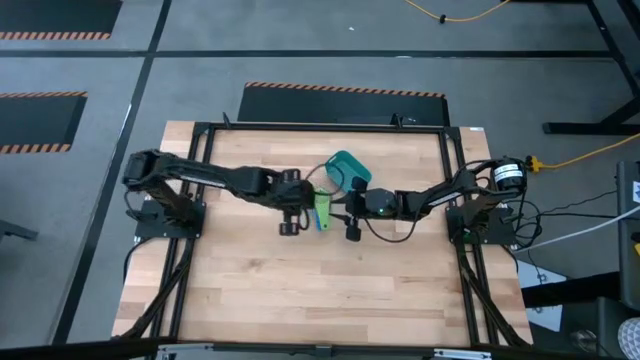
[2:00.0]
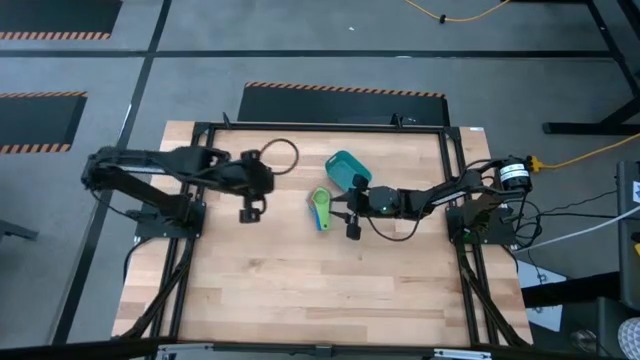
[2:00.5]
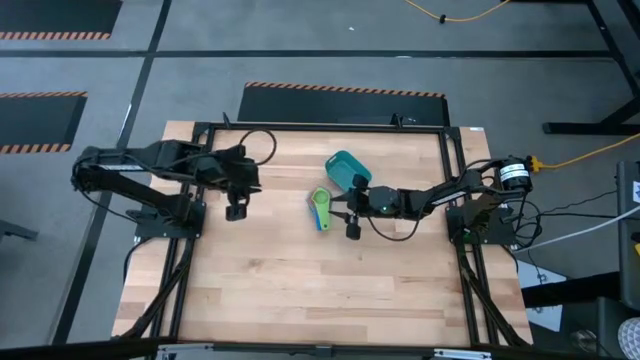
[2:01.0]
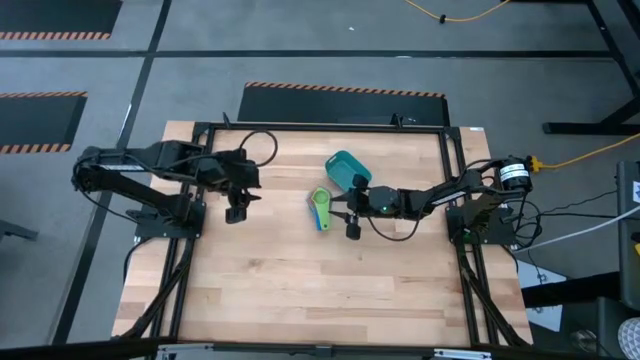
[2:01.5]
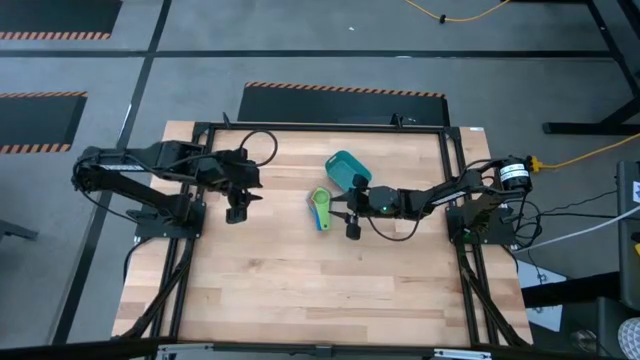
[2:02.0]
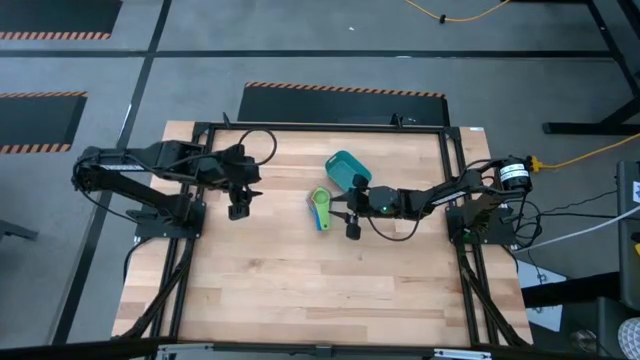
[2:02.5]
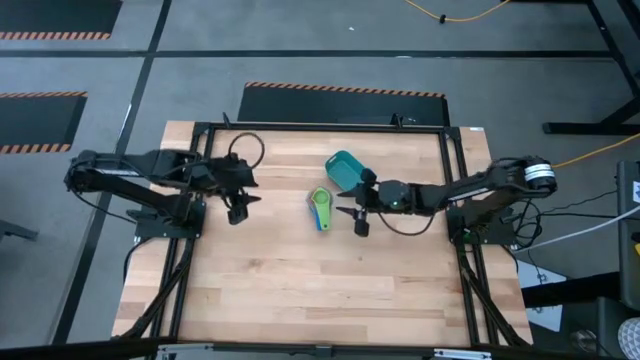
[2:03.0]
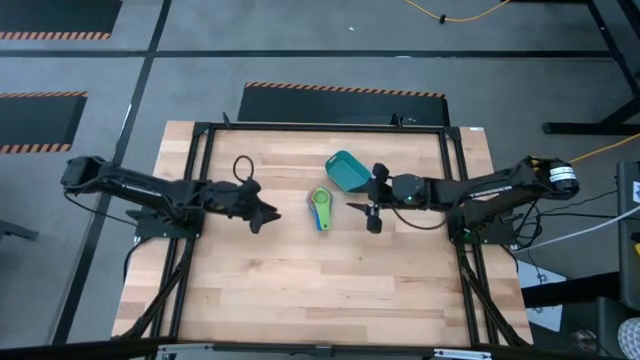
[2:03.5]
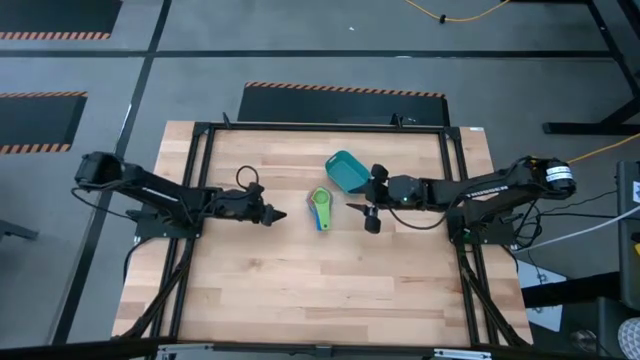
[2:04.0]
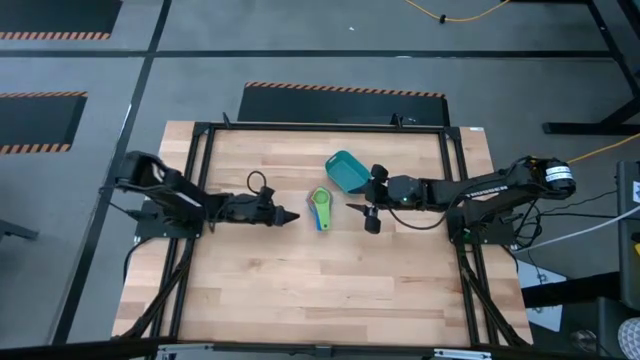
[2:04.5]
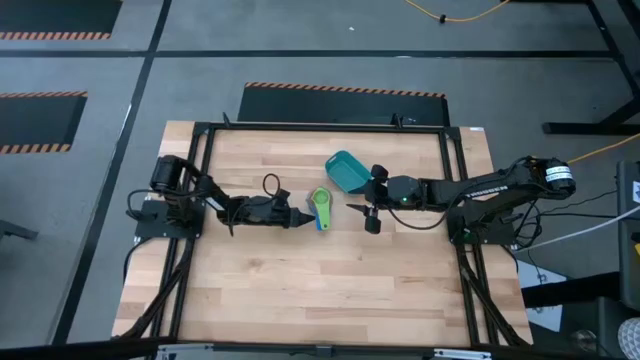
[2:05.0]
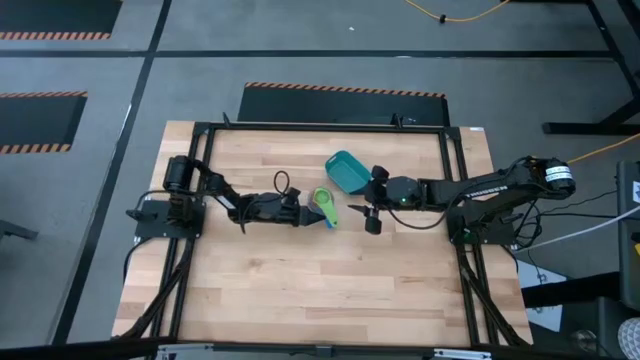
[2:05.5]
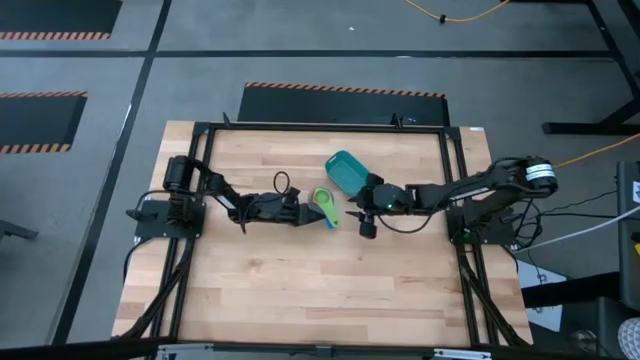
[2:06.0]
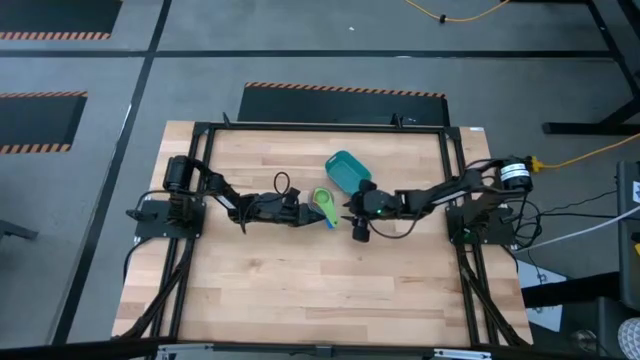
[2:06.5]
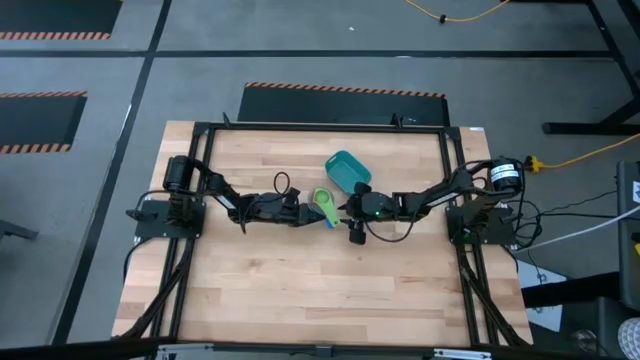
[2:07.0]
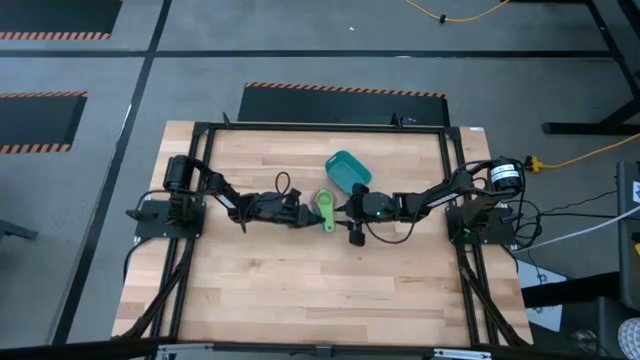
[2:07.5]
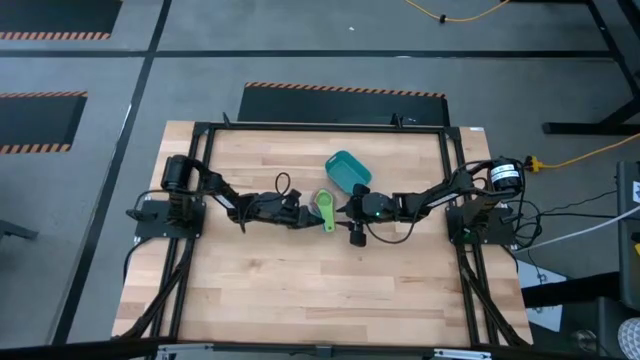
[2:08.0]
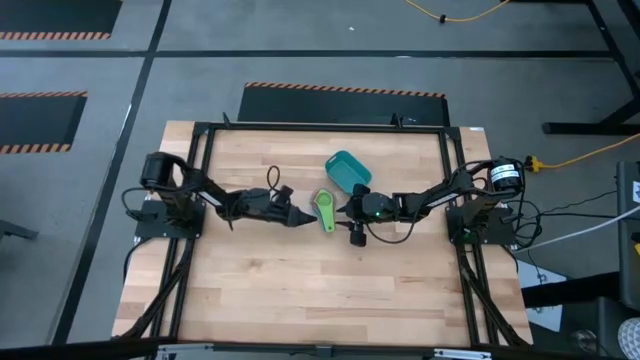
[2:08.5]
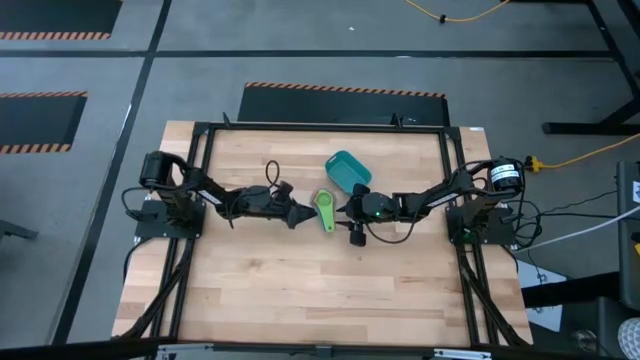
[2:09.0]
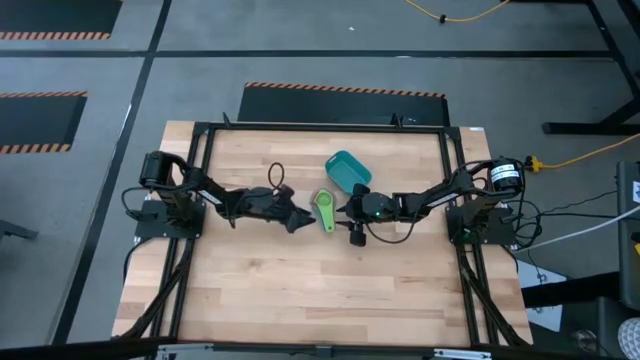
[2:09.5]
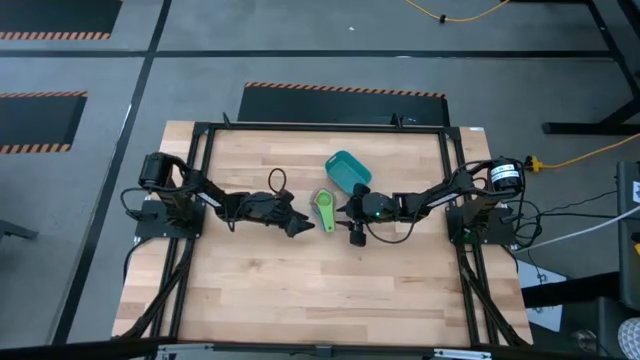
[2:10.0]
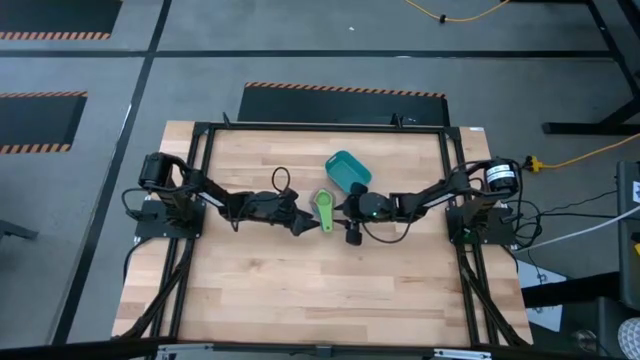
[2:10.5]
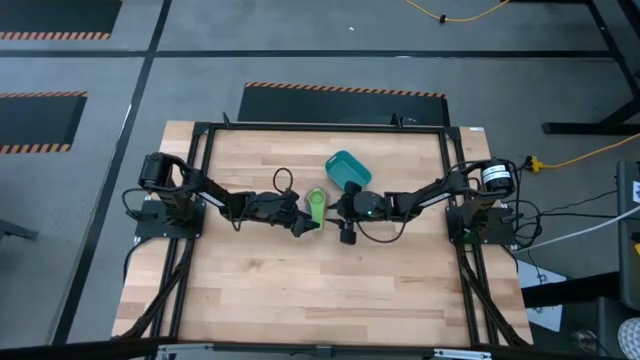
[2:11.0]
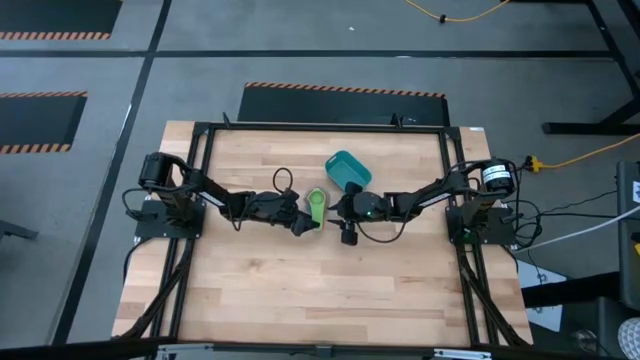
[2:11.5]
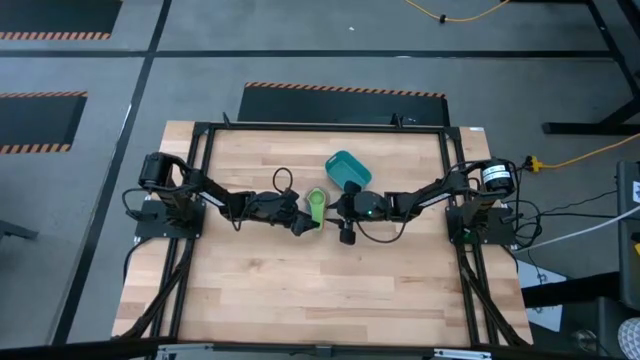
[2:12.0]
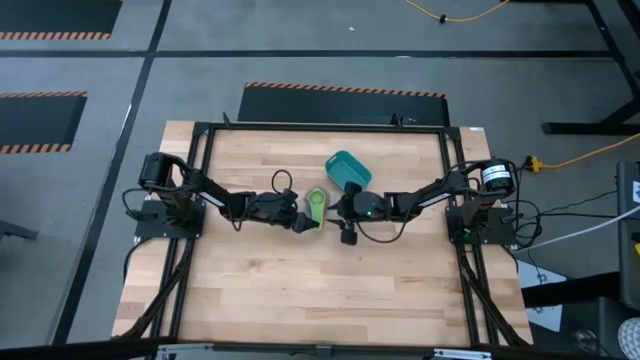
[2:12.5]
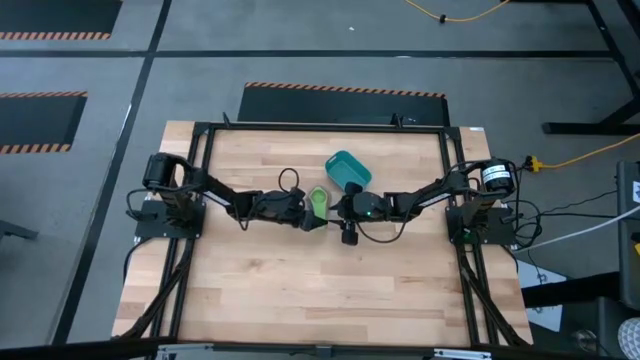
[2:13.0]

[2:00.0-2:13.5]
Task: Nest measuring cups in basket
Put the nested measuring cups into the green bin
